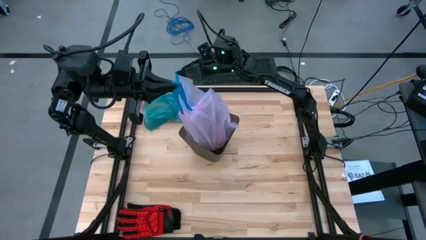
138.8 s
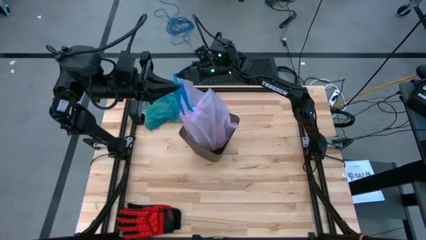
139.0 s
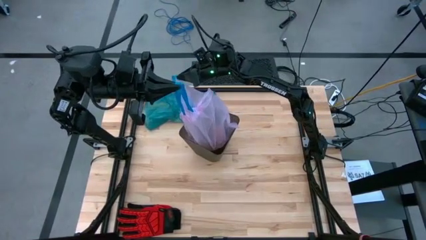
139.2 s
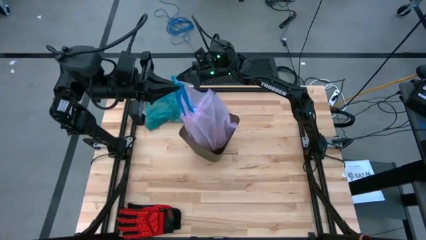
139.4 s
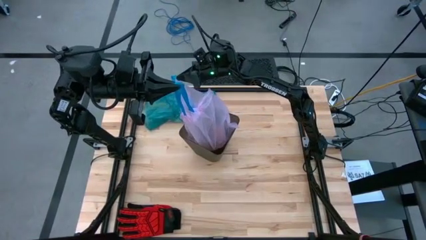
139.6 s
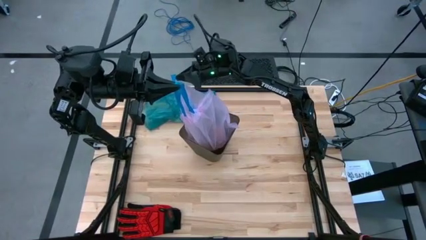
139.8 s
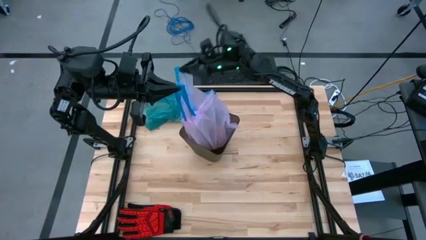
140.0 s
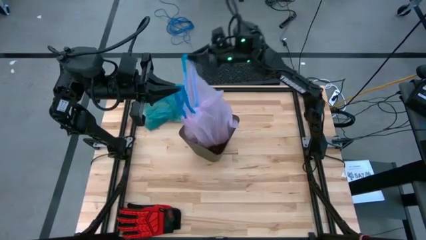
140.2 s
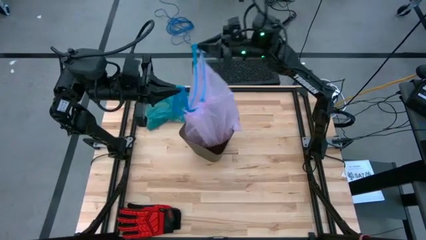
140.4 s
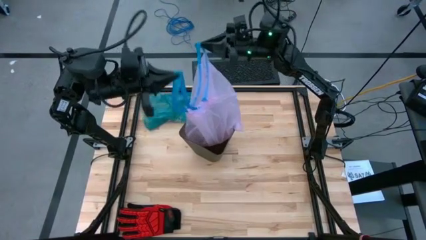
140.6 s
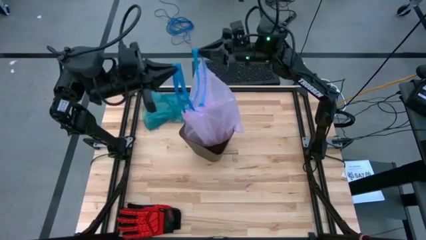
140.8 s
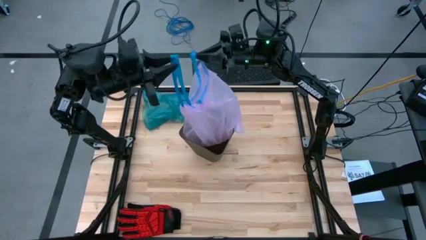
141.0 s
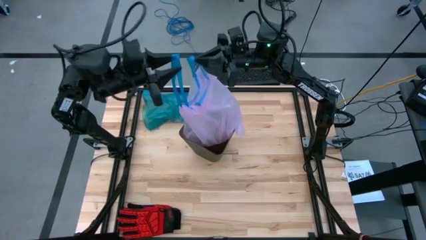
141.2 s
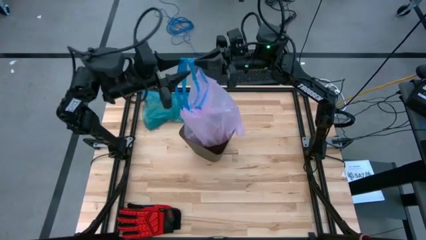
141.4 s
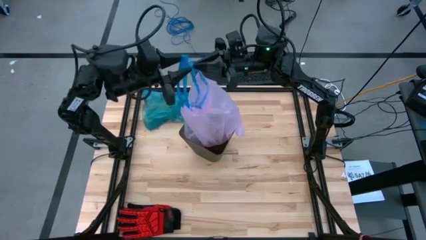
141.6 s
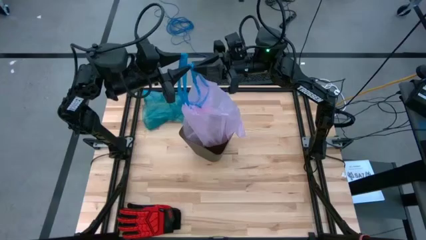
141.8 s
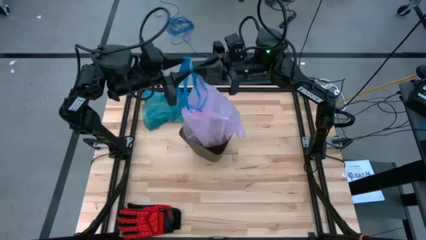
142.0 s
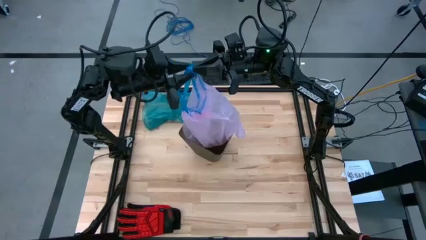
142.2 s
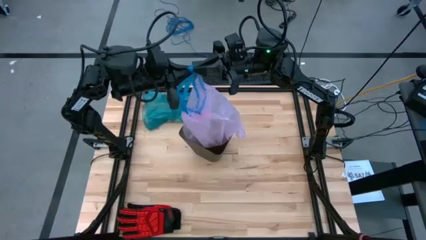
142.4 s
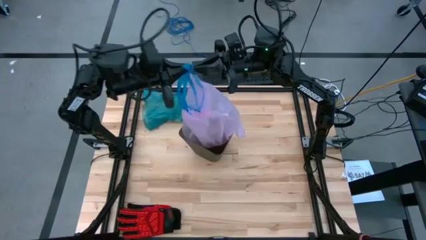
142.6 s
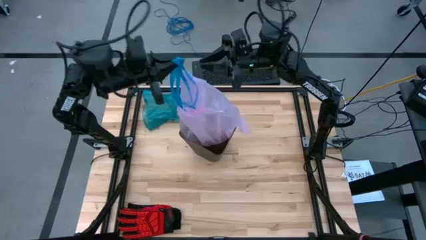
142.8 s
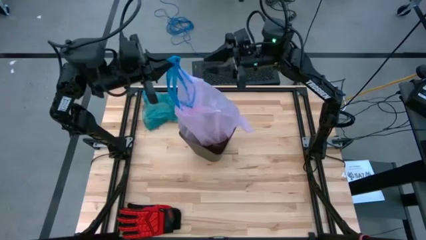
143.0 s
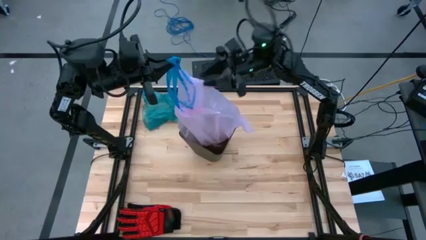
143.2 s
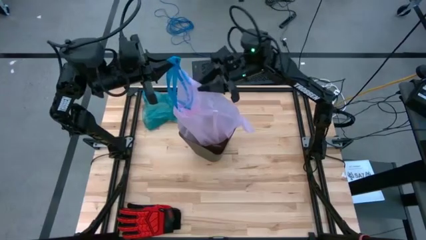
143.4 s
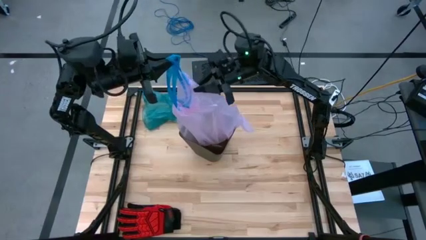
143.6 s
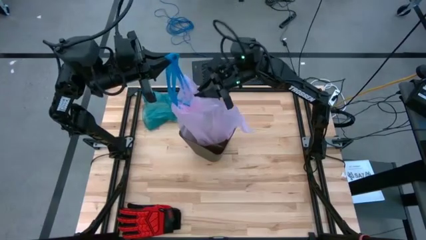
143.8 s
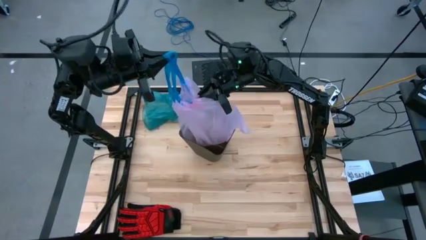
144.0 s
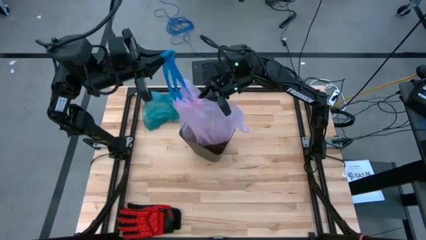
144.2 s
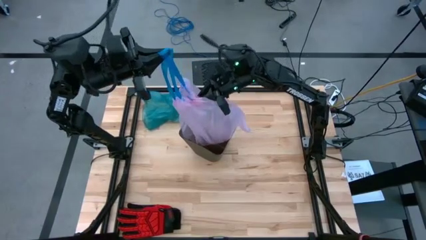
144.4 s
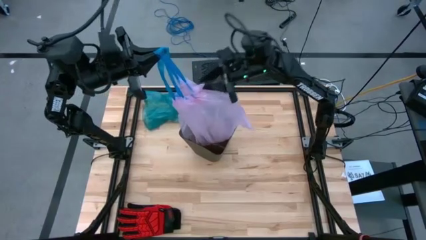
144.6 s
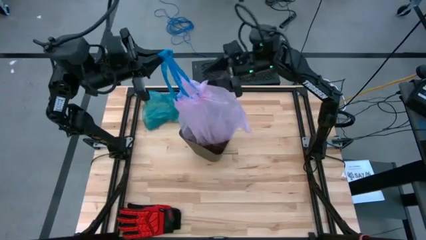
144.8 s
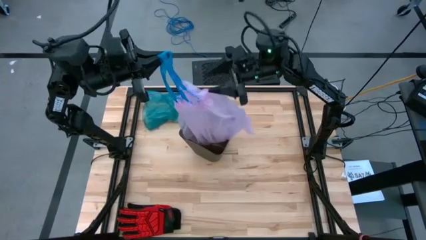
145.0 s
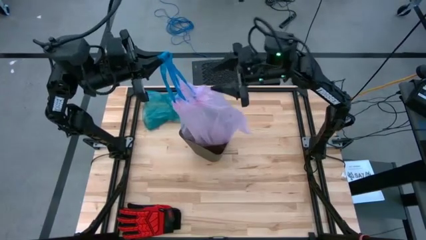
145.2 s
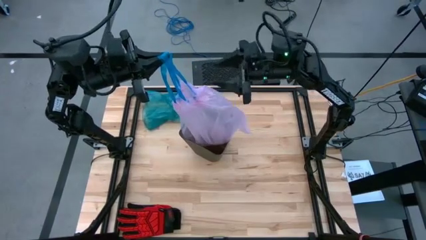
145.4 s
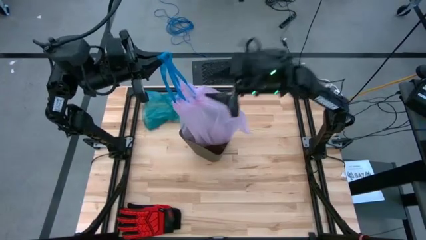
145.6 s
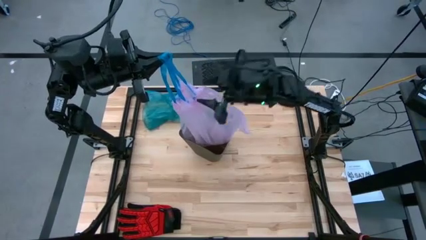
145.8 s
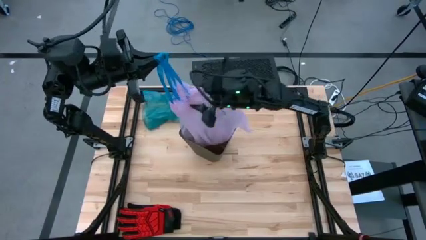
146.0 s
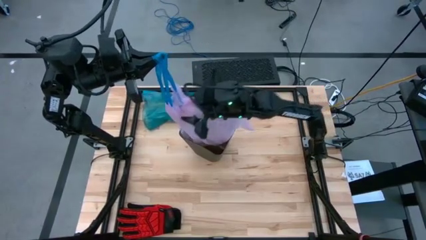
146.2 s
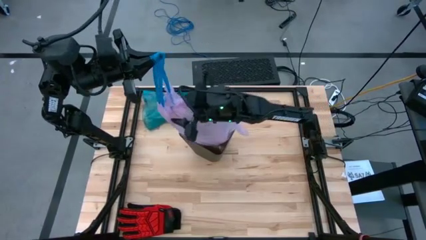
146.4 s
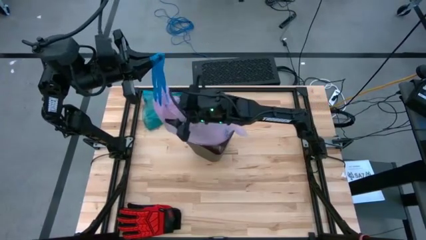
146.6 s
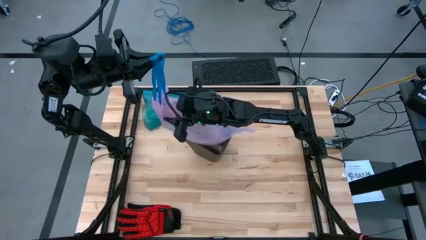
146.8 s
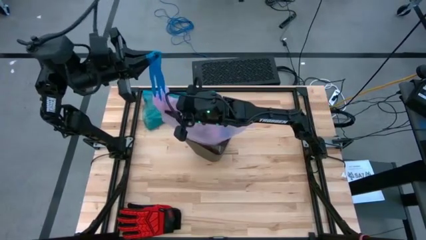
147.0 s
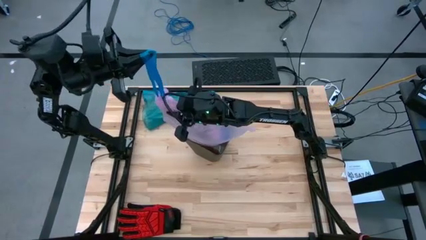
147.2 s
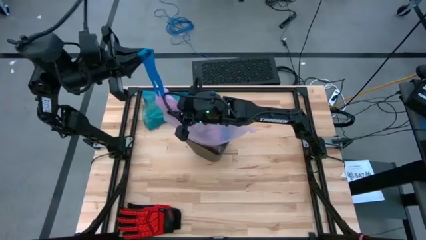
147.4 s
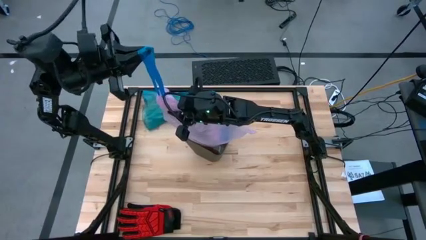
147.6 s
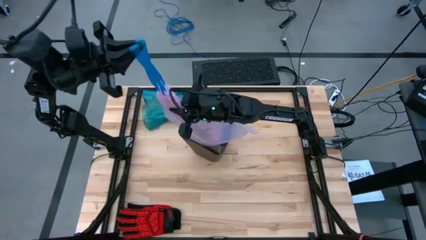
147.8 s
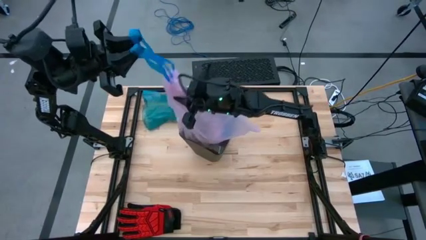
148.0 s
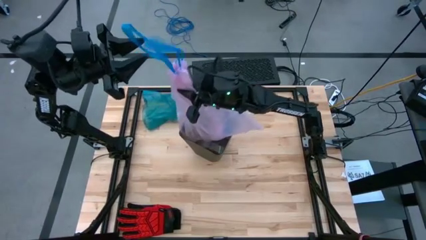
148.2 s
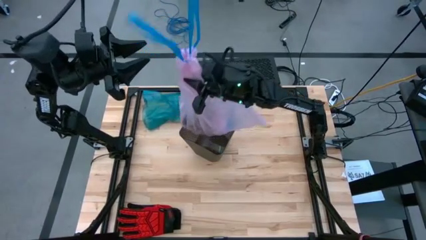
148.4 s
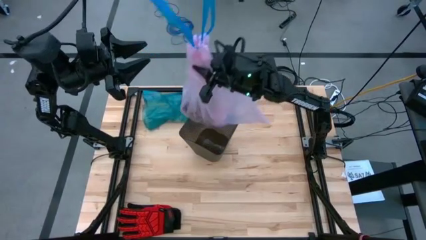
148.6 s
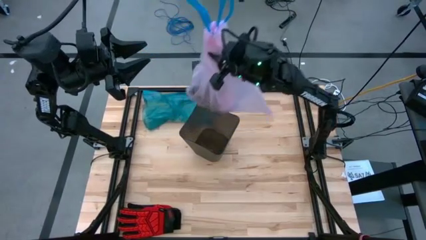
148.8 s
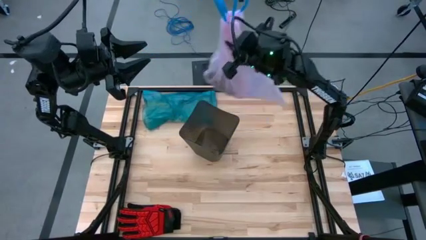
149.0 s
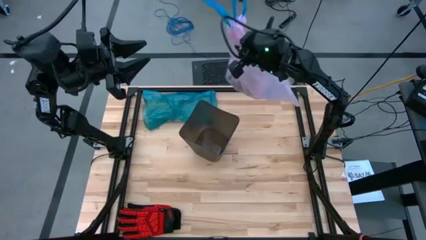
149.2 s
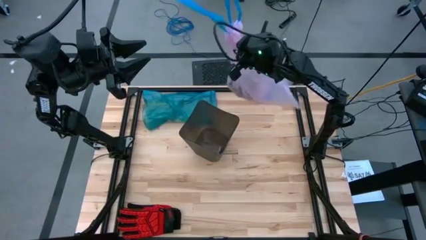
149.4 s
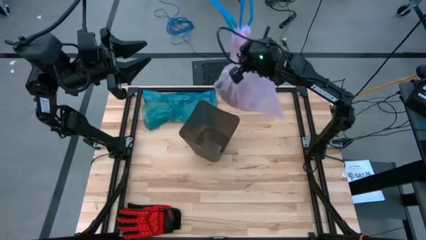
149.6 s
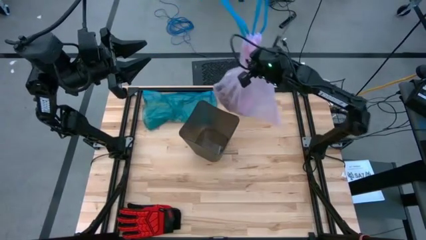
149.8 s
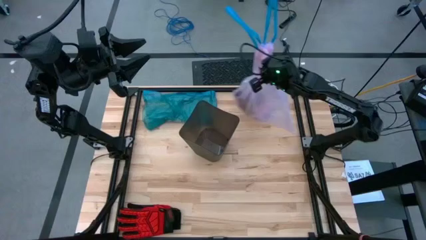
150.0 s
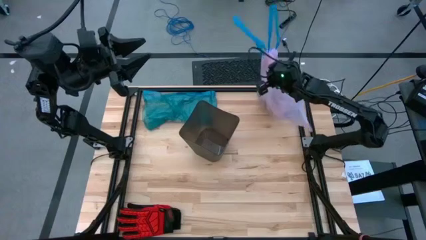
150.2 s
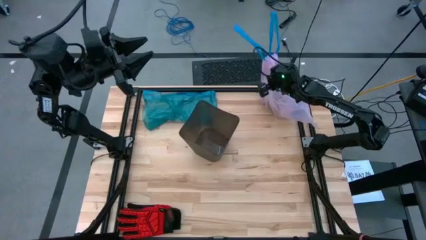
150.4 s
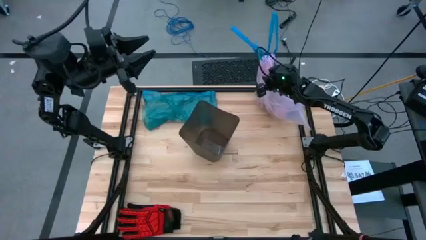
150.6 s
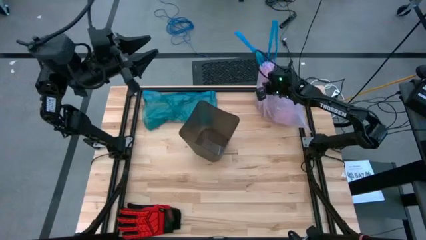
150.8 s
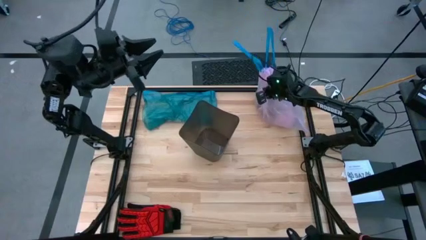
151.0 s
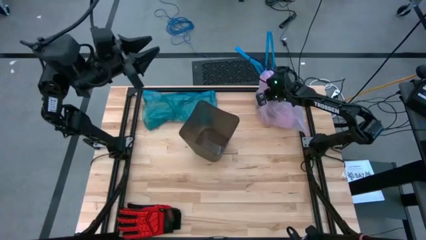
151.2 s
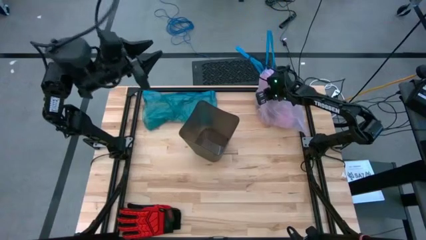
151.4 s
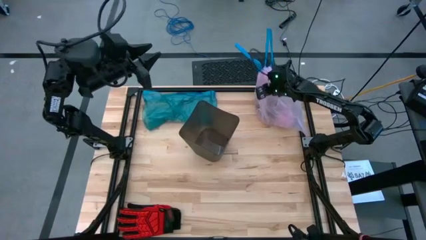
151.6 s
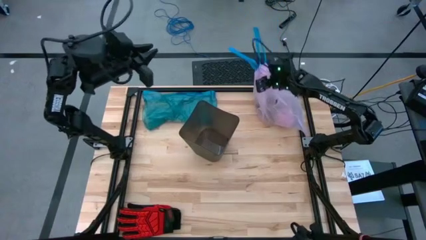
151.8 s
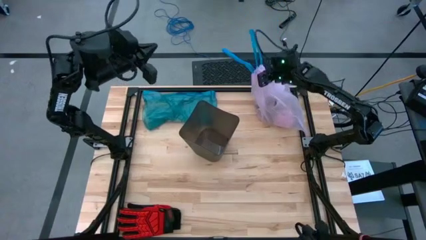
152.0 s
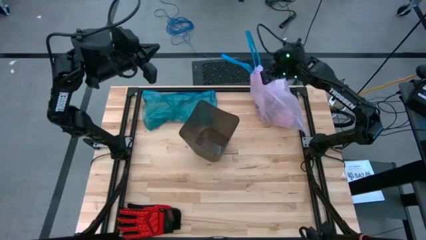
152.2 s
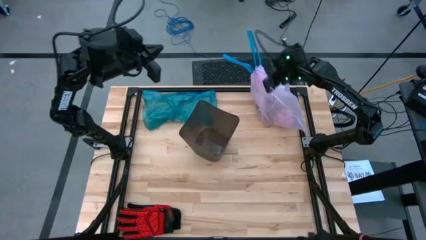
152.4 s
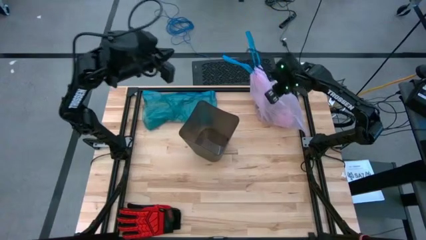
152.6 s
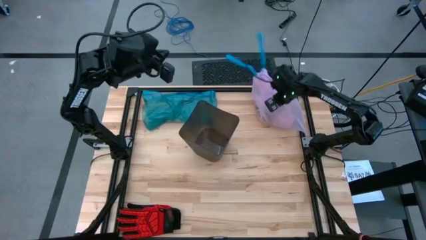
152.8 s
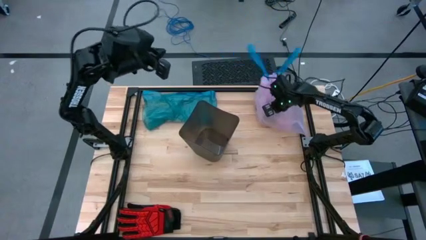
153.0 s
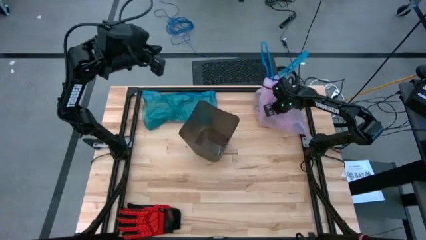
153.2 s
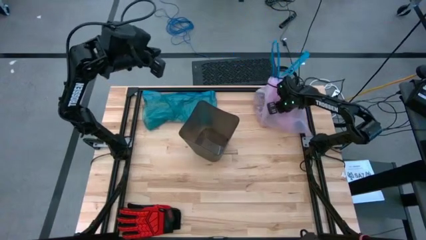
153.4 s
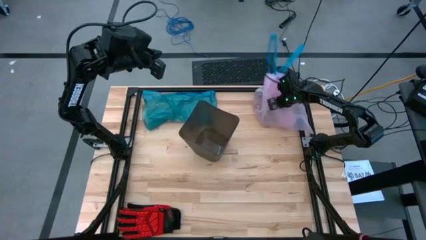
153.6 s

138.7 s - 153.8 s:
Task: place trash/remove bag and relplace
Remove the pink trash bag from the black trash bin
